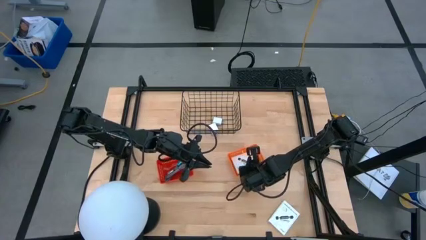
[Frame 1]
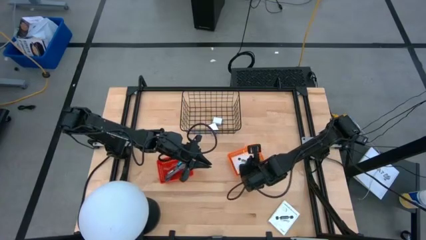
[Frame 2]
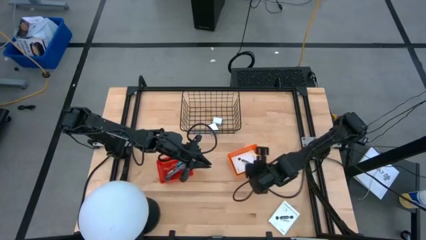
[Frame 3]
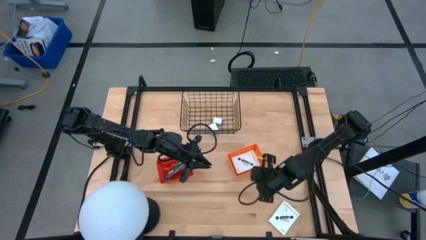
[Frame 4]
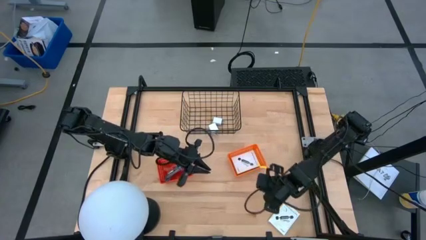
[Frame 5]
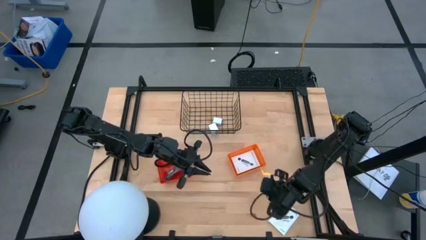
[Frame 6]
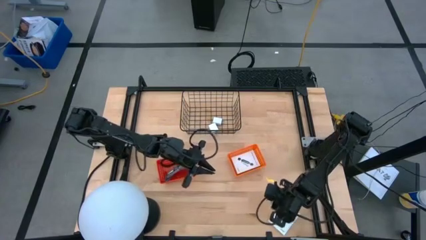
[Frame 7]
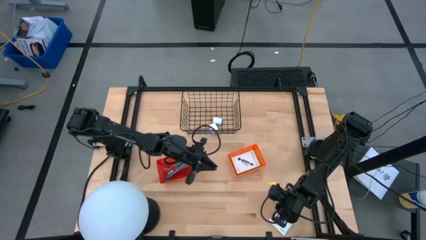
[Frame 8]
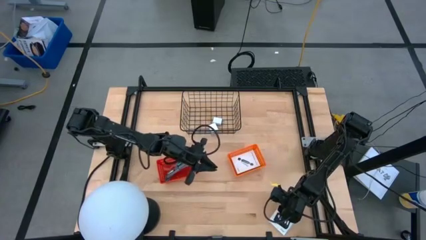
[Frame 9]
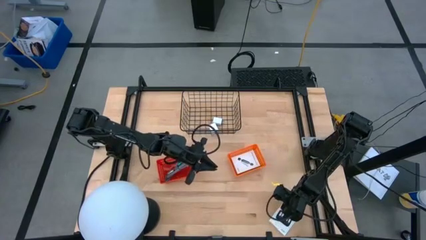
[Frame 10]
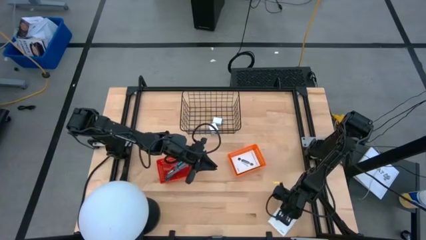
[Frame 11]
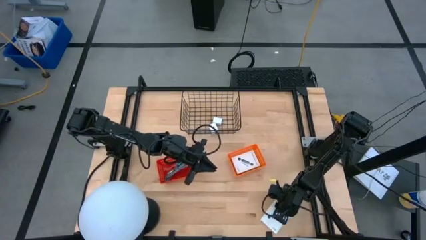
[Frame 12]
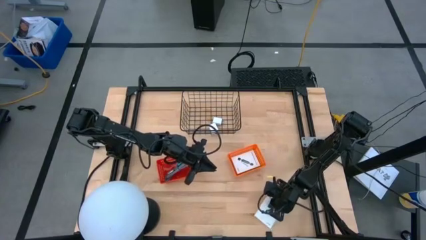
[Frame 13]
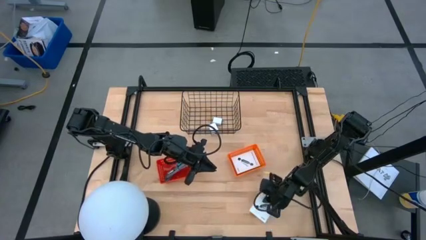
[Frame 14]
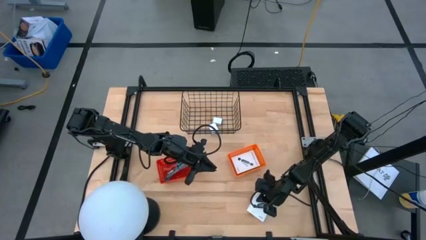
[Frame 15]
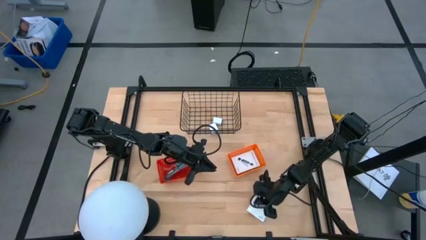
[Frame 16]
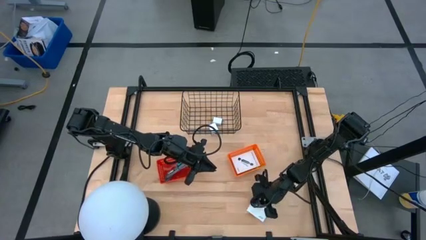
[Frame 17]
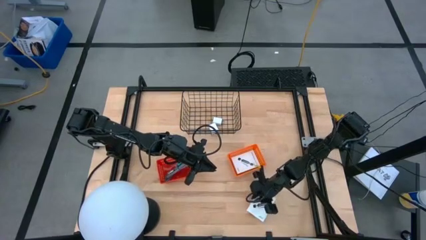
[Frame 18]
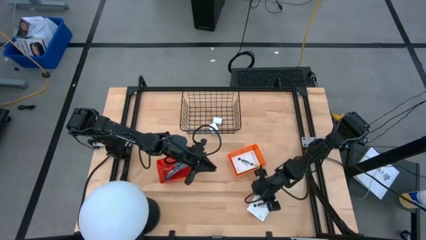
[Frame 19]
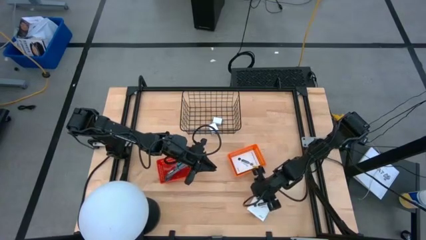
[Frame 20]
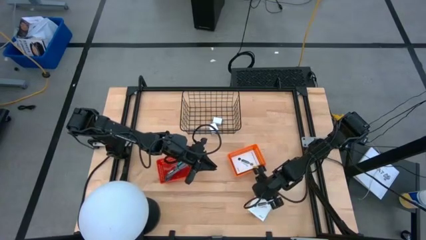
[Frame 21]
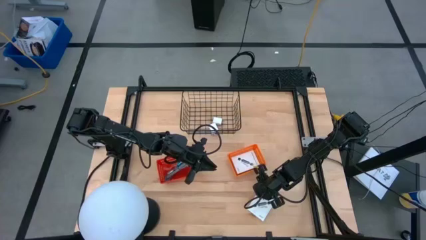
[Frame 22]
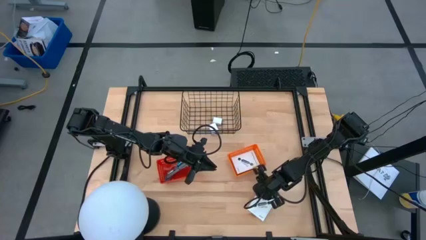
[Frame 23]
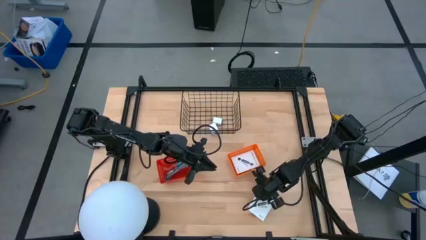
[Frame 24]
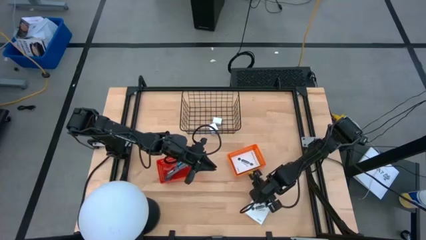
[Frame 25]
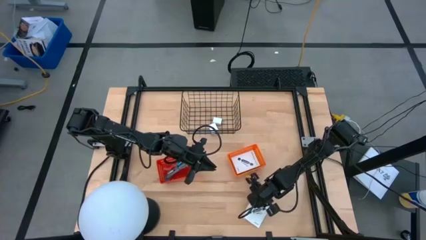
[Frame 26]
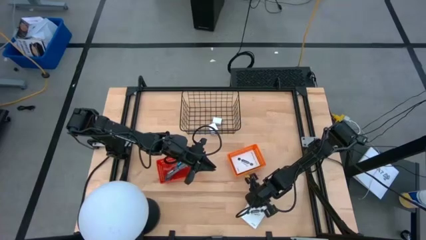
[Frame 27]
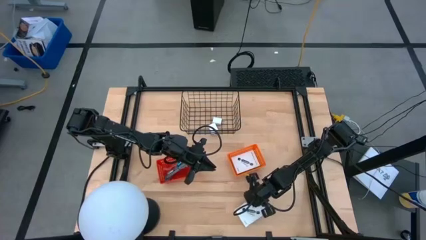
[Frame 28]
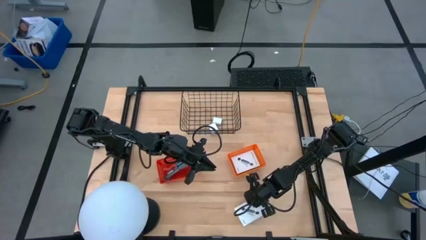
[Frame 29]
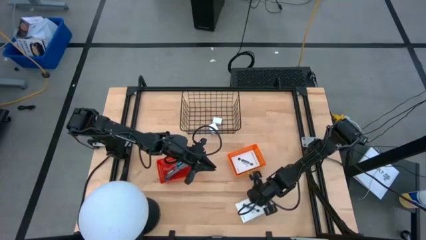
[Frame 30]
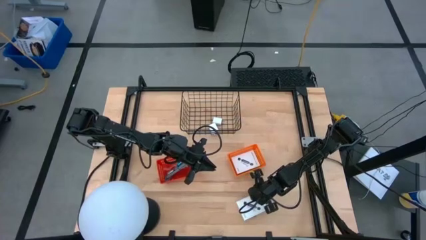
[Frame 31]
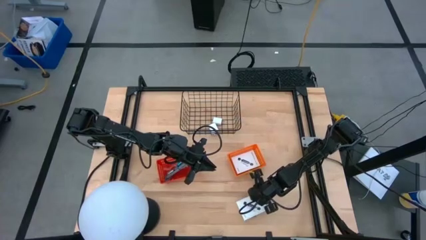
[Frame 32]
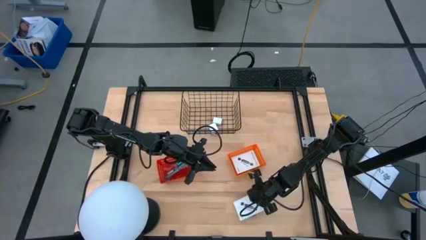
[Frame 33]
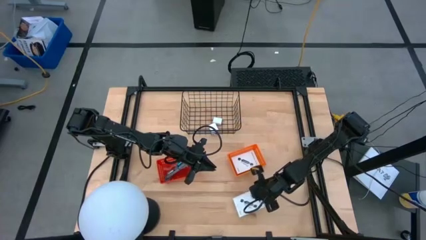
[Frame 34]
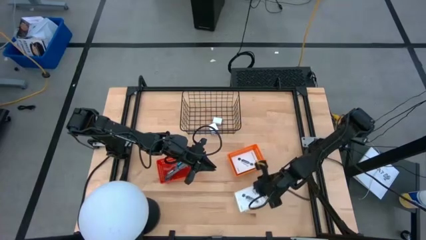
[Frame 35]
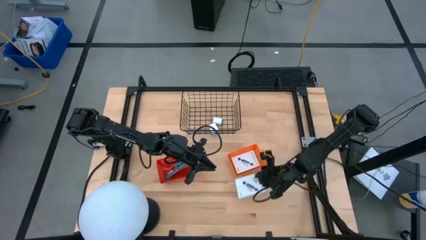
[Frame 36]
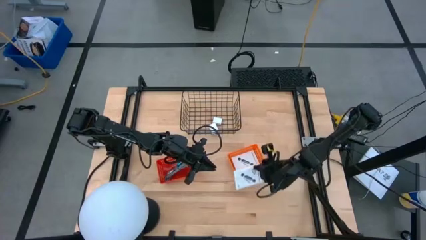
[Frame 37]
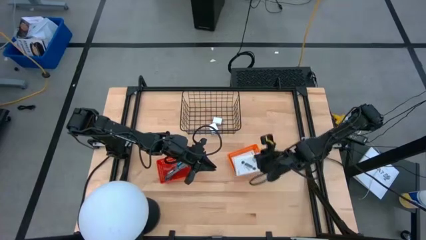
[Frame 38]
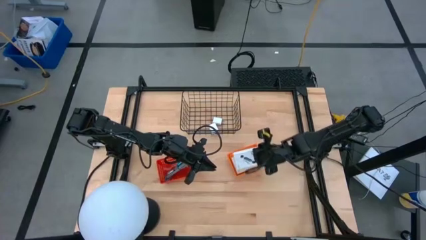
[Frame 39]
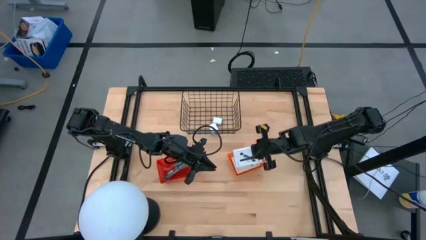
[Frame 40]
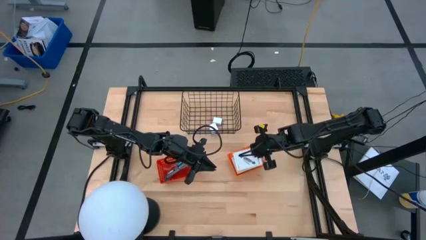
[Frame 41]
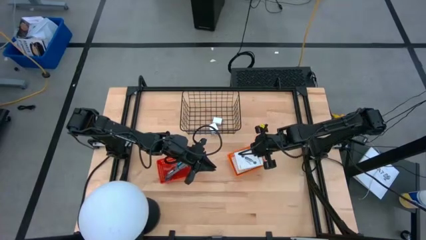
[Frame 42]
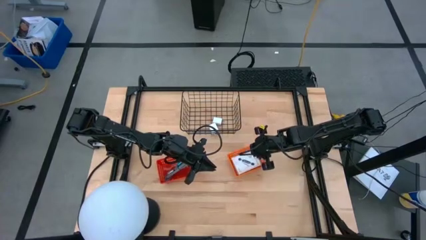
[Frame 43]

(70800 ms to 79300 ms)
Task: Pick and place items into bin
Put the card reader box into the orange basket

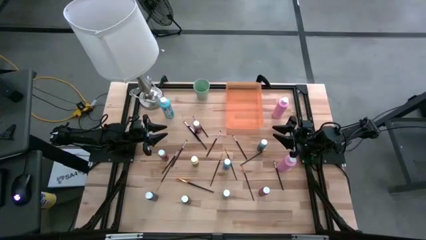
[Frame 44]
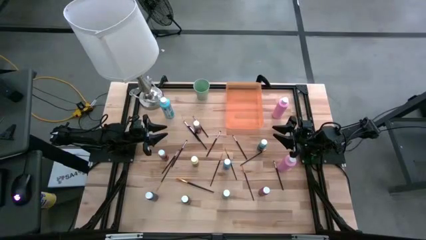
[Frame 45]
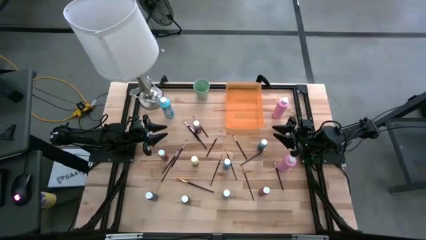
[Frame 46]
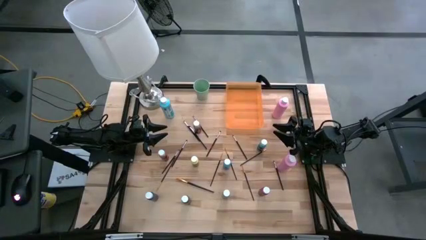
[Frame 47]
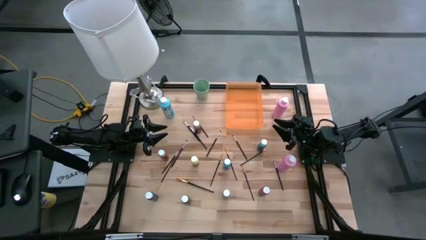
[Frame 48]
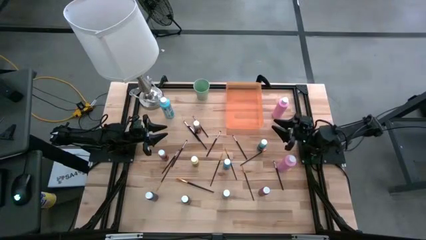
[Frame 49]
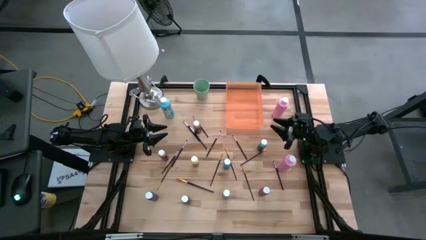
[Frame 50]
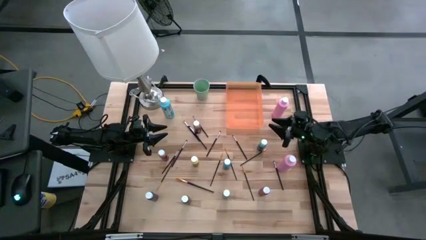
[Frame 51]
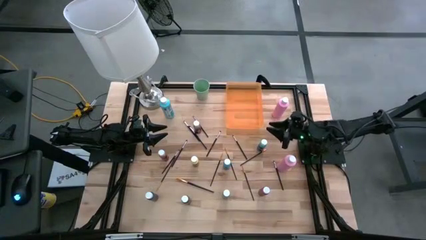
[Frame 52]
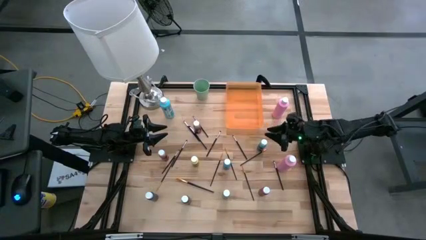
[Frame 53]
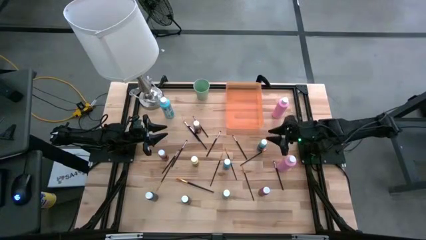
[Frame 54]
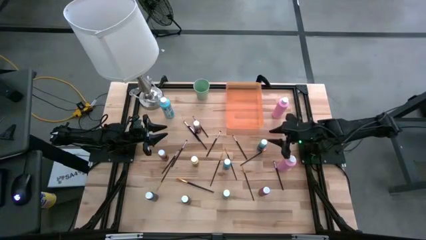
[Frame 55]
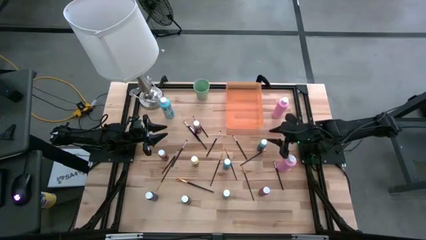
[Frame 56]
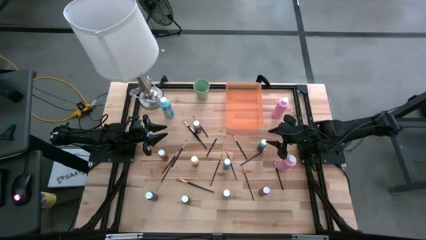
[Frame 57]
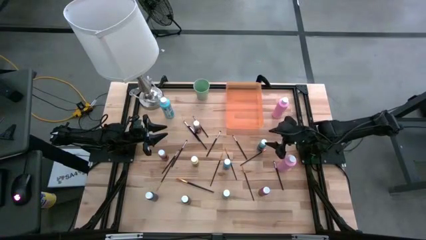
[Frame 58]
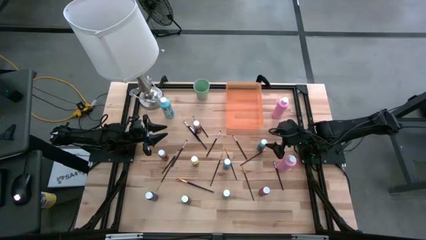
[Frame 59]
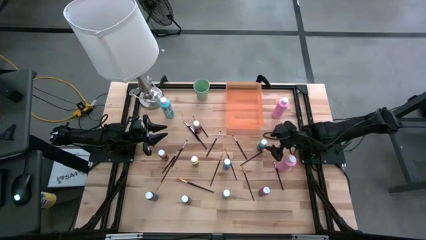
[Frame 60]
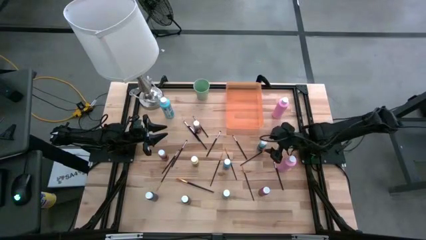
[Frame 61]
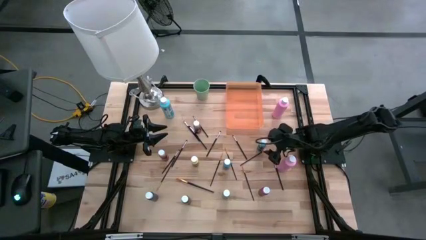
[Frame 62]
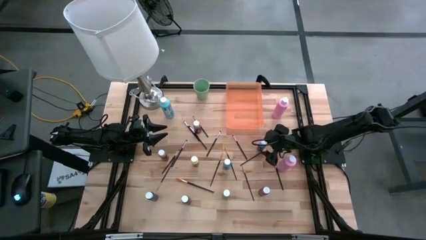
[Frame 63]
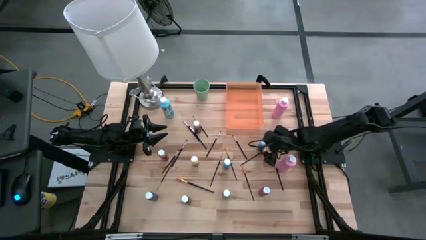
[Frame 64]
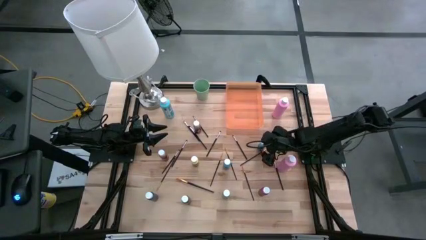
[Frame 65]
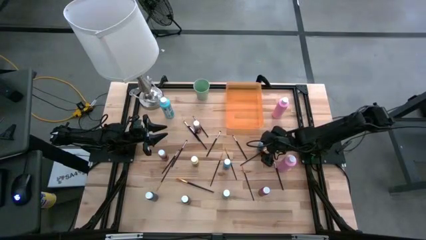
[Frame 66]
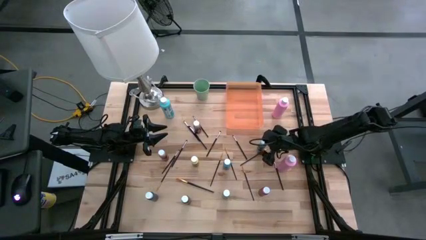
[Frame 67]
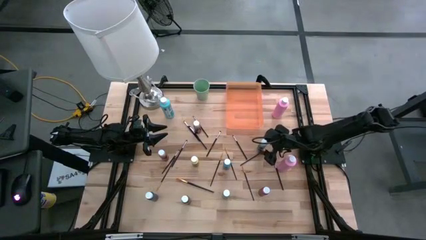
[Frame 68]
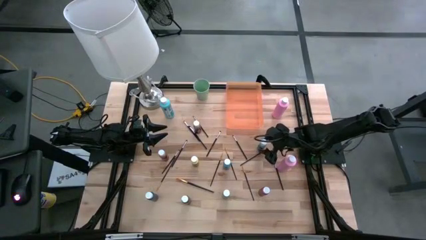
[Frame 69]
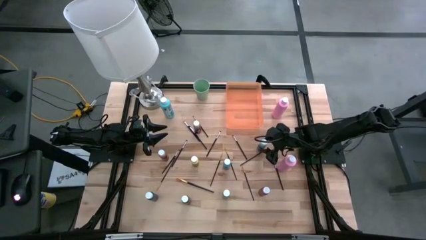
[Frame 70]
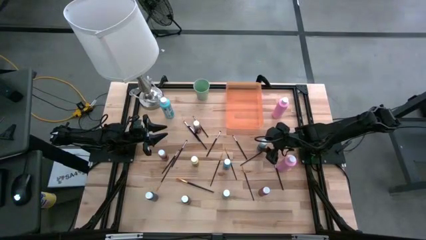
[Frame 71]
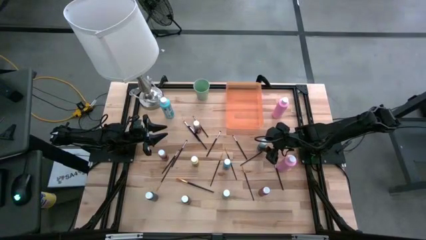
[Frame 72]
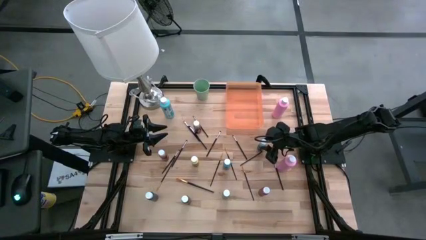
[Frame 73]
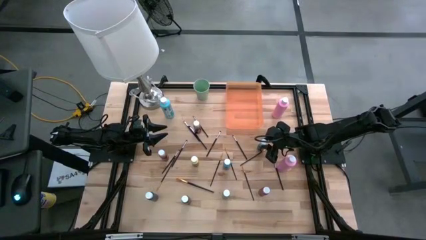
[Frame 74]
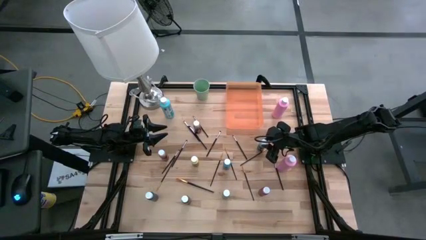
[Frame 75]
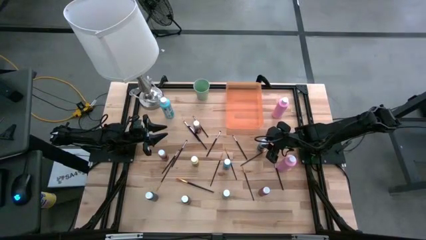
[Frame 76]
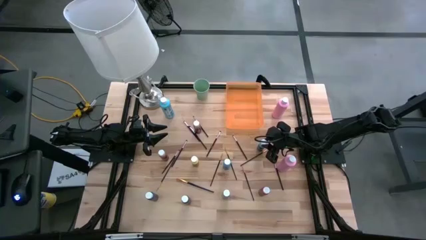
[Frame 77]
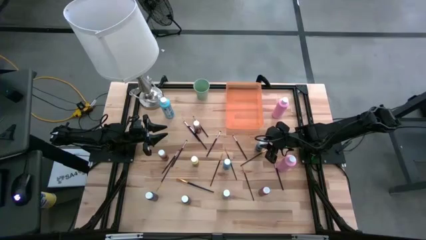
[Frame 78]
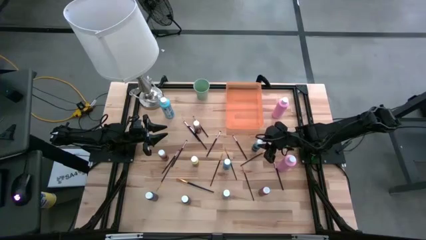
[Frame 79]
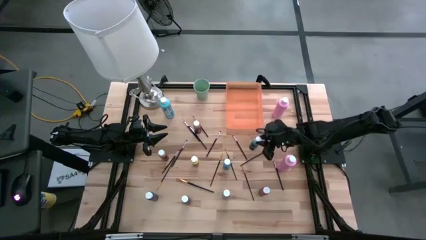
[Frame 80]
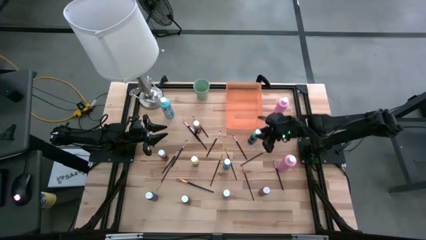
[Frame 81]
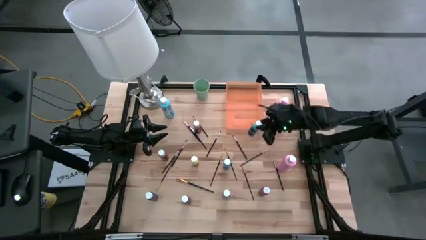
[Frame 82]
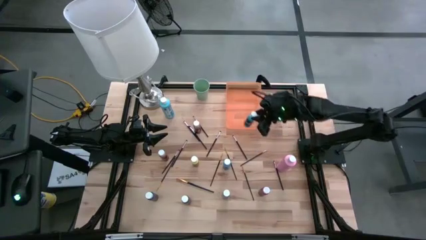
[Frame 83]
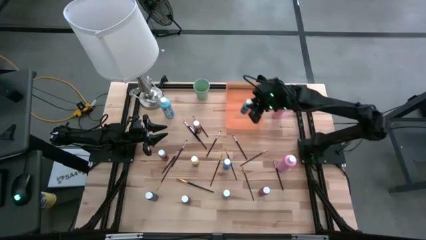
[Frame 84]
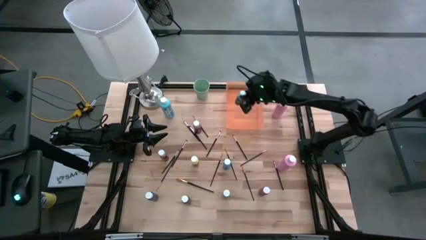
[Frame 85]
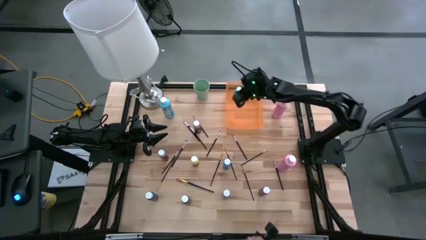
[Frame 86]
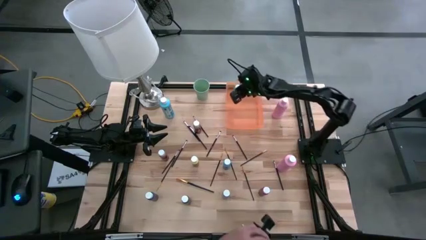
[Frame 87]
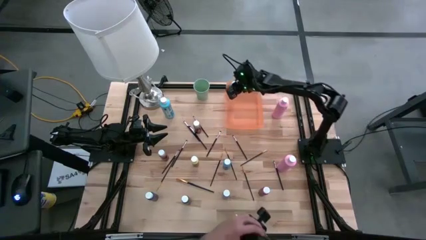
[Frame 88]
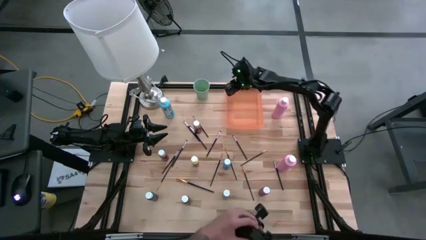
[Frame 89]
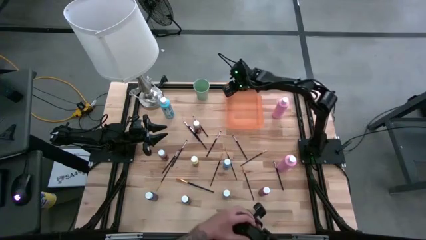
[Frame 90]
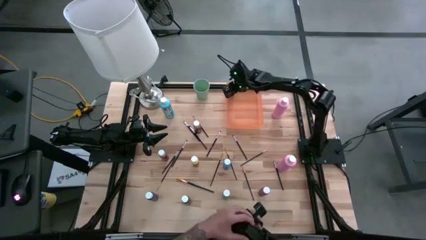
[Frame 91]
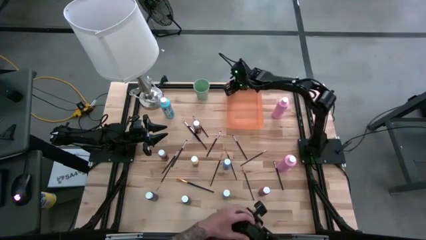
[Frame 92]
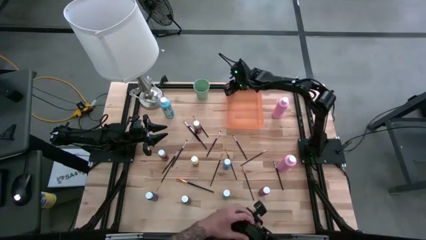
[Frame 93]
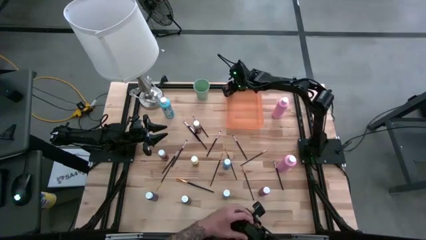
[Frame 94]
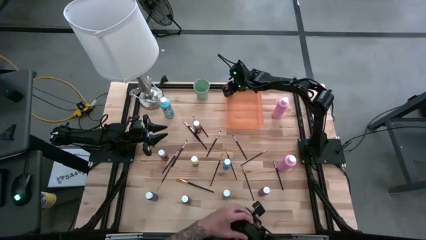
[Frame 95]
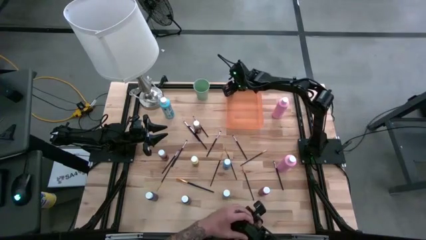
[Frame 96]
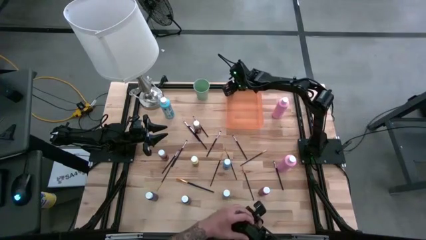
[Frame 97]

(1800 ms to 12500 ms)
Task: Pick & Place Paint Supplies
Put the small light blue paint bottle into the orange bin
